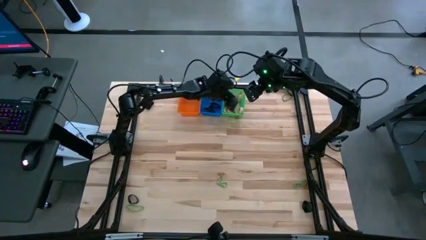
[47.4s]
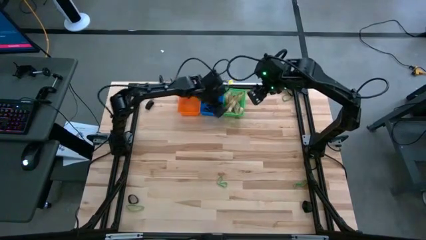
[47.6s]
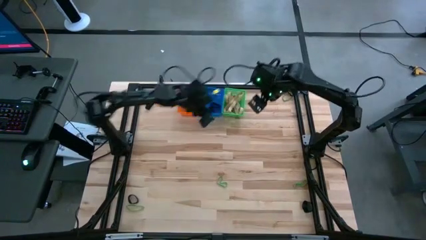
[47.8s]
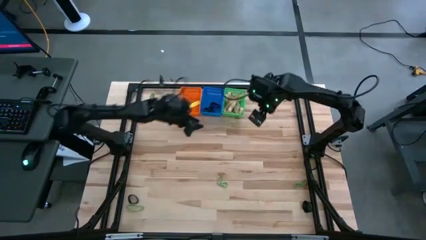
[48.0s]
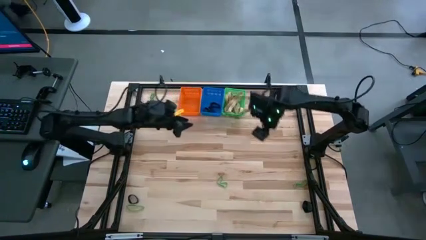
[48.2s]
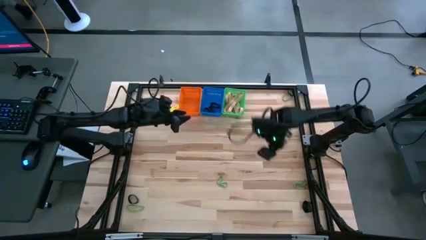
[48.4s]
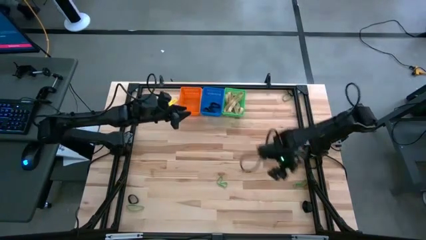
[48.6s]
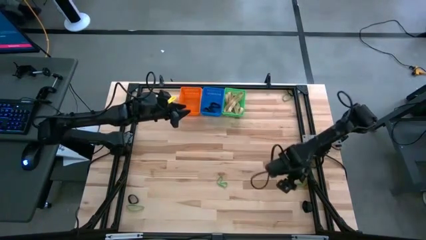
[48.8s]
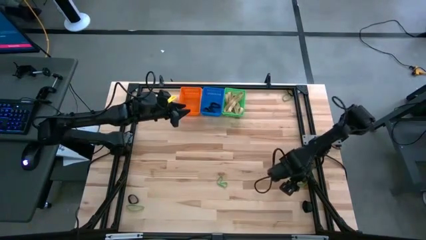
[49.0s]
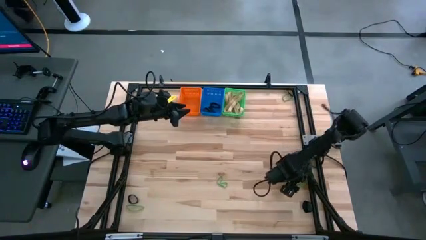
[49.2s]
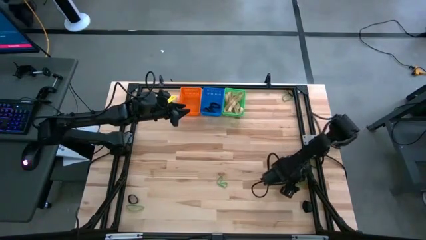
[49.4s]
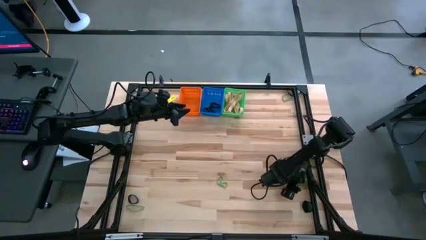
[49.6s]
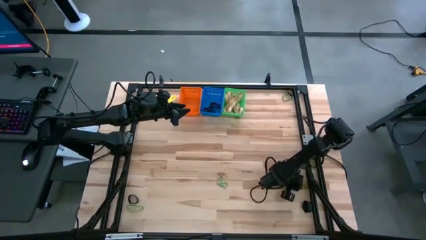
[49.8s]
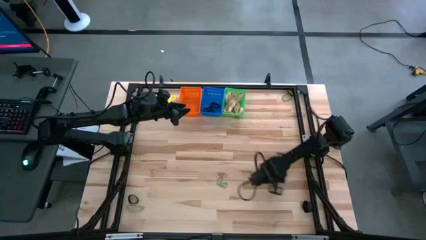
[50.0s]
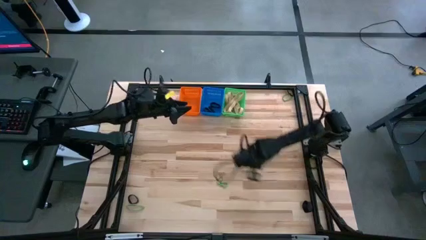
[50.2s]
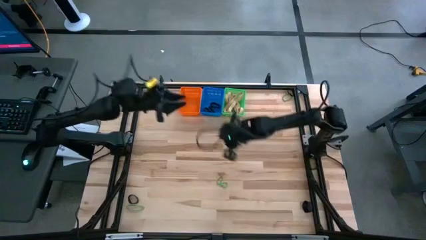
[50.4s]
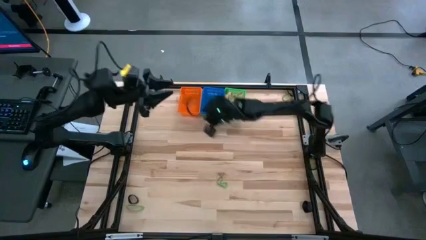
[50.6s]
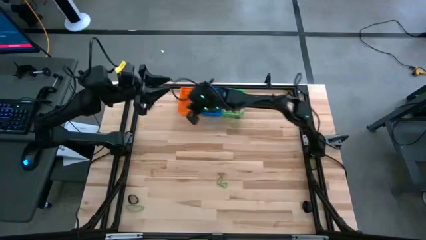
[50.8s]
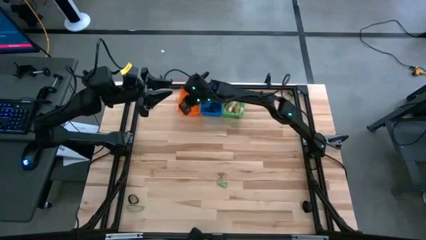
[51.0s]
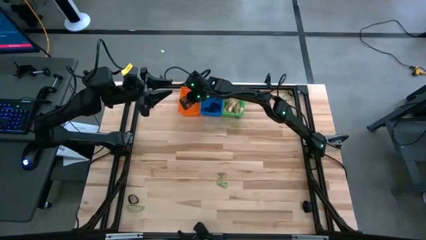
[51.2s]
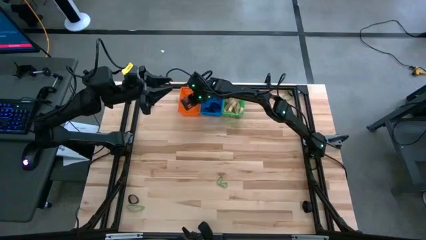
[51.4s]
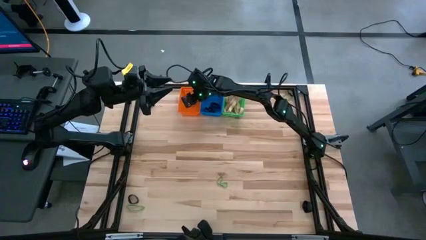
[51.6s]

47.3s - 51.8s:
Task: Sort rubber bands into baskets
Put the green rubber band into the orange bin

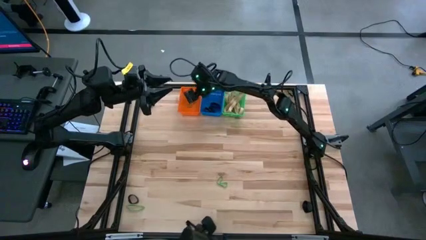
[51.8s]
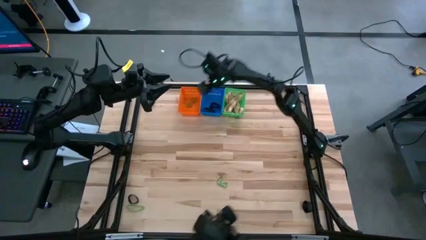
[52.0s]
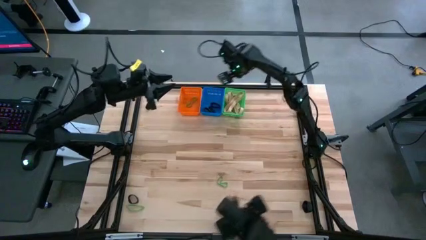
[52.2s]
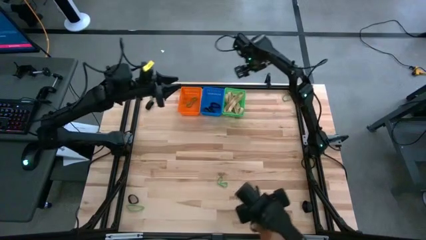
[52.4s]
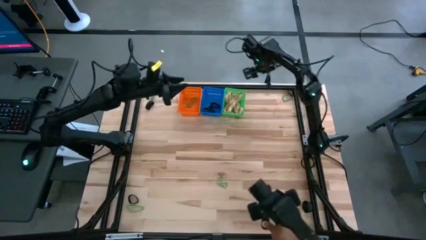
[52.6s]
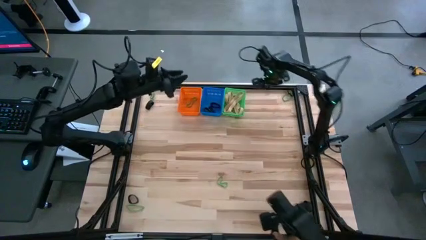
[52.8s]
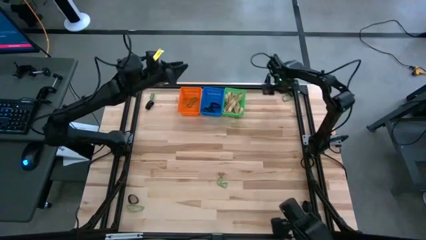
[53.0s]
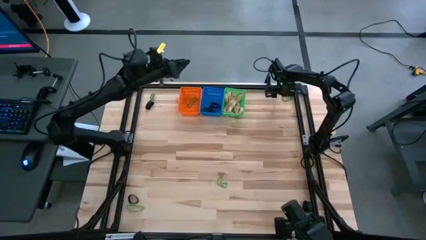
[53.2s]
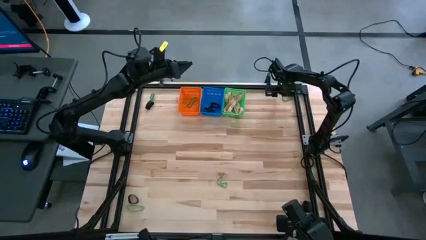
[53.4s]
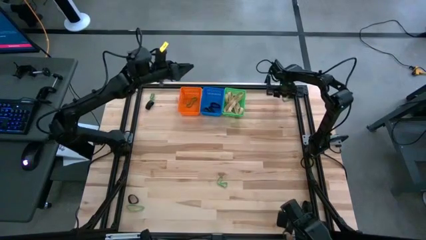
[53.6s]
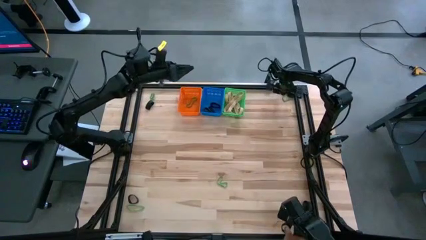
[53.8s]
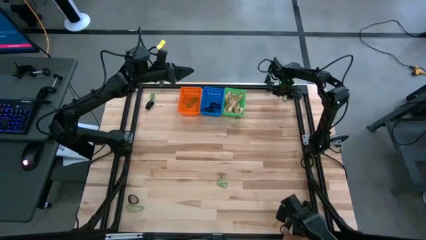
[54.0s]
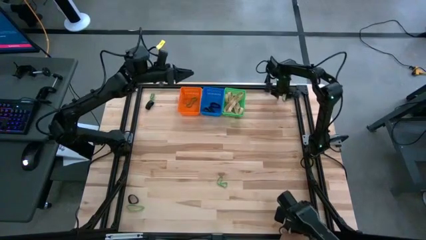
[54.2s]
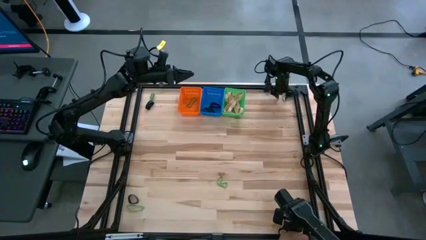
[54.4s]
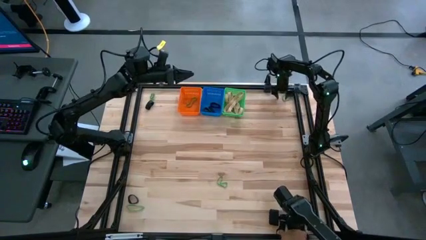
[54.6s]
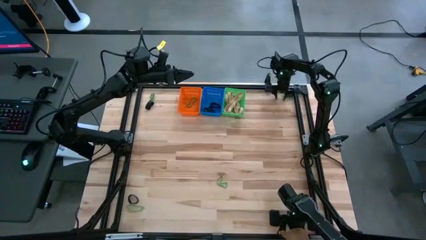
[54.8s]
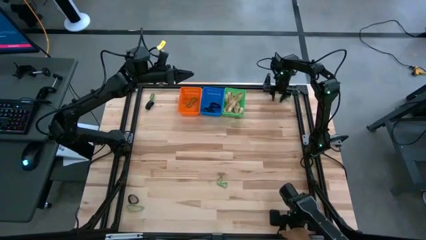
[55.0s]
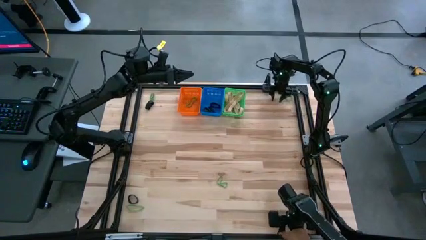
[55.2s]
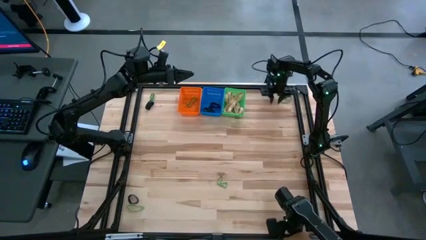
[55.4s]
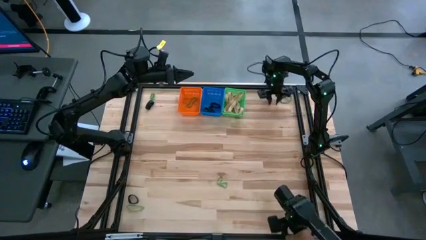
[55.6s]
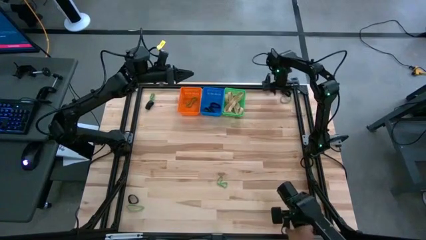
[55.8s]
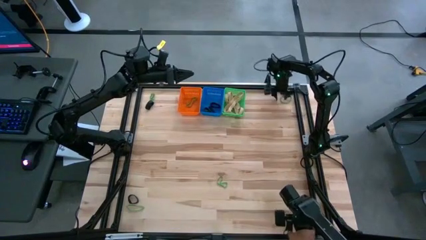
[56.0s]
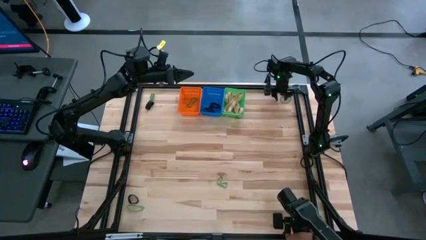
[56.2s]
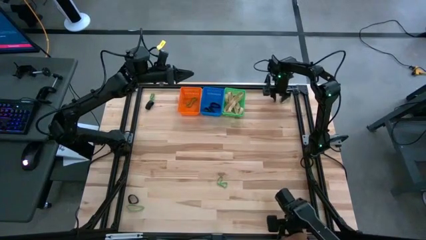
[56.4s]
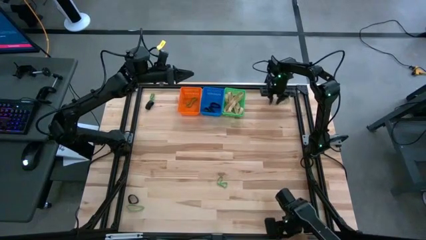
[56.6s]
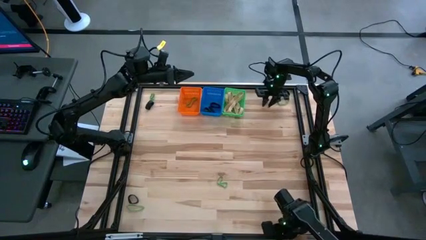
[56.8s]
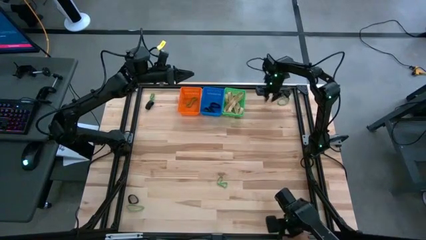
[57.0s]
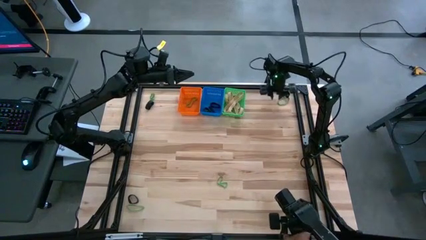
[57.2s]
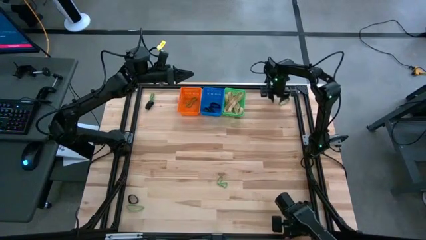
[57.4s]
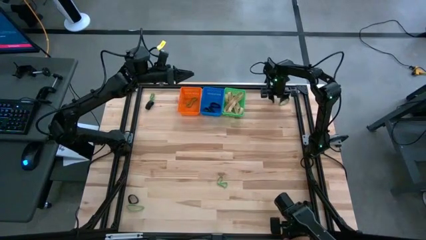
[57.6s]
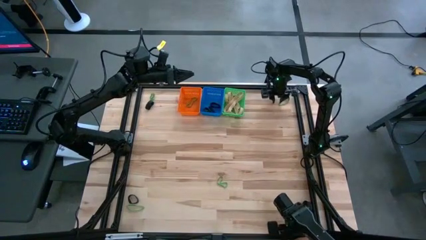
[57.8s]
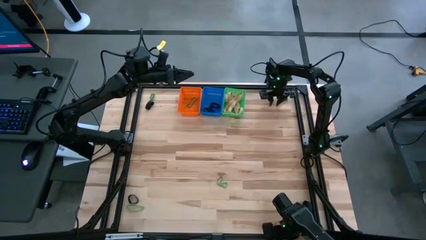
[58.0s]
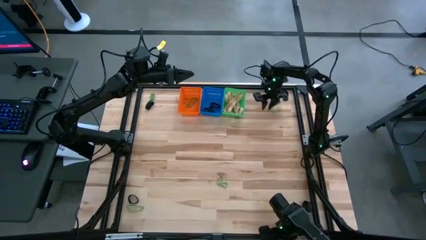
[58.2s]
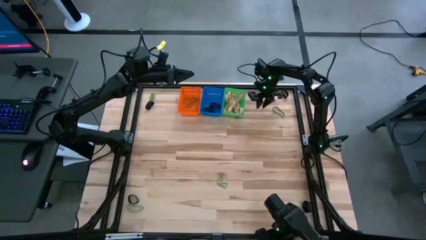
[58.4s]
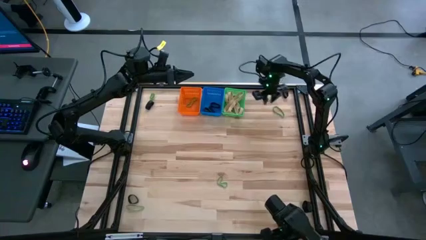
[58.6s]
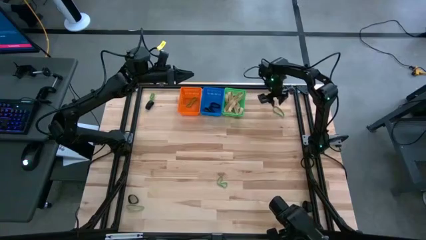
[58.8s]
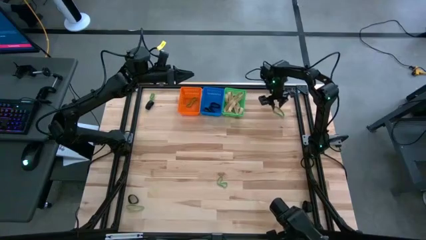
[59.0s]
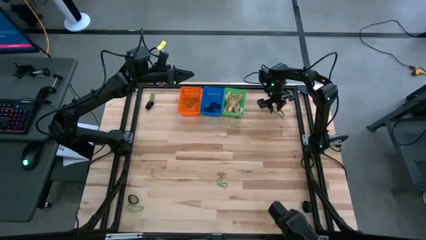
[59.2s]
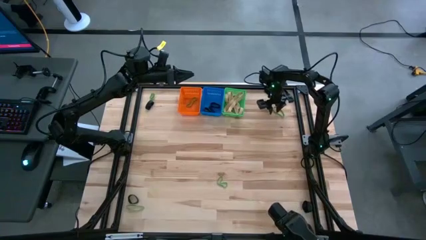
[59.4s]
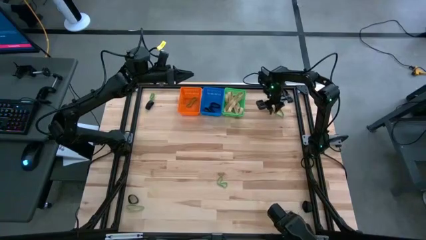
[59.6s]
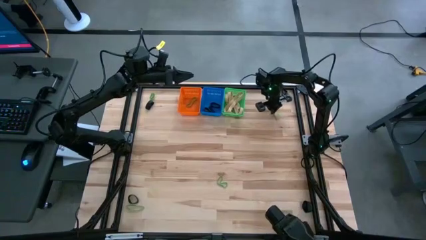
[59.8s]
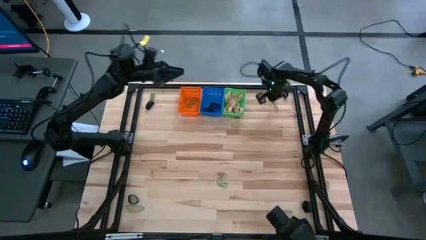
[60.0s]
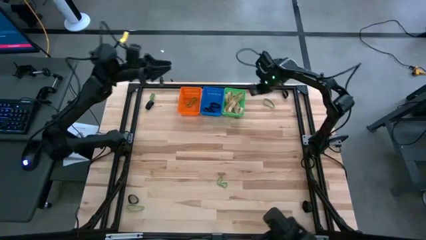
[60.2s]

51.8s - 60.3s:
Put the green rubber band into the orange bin

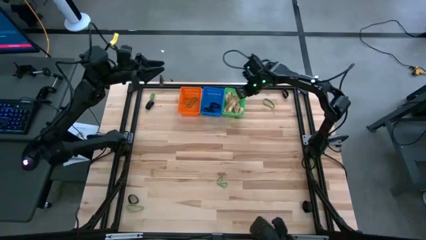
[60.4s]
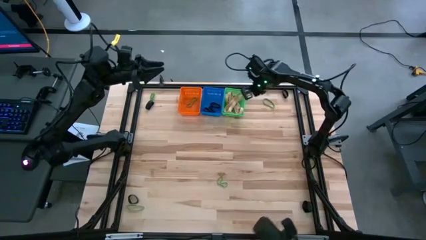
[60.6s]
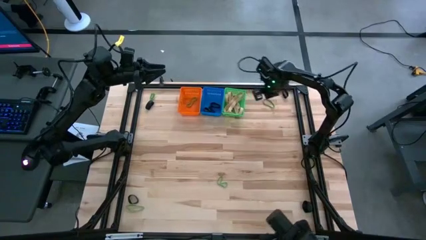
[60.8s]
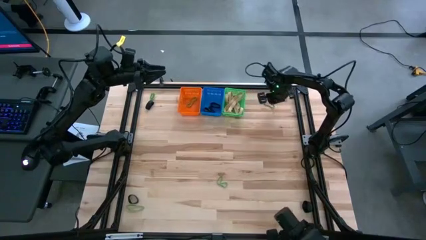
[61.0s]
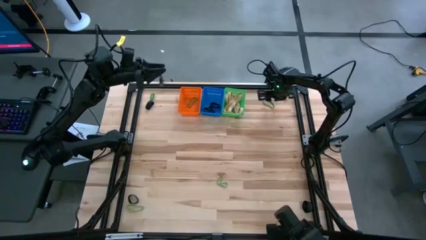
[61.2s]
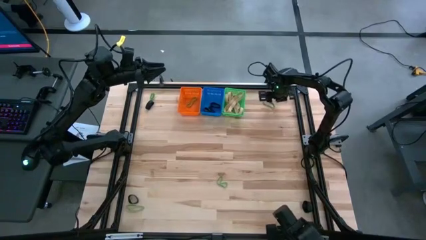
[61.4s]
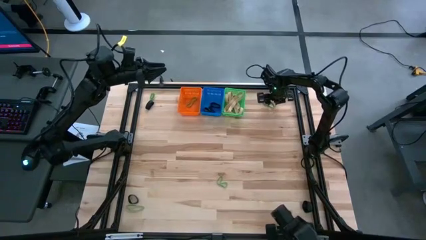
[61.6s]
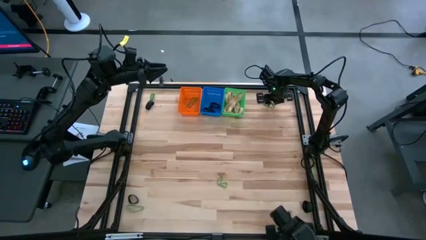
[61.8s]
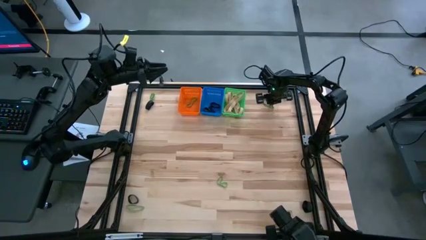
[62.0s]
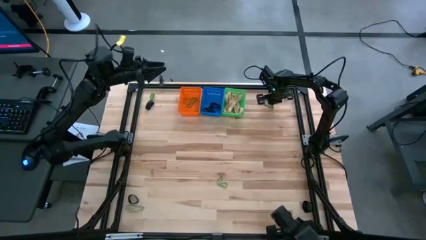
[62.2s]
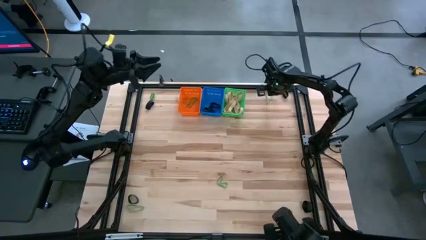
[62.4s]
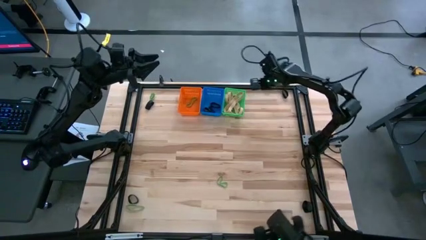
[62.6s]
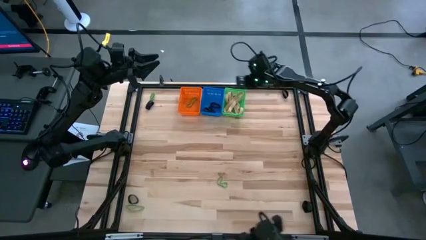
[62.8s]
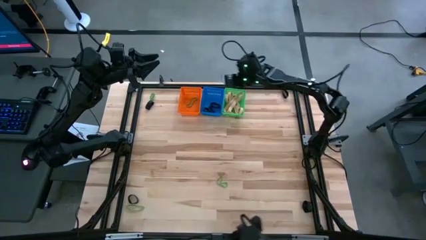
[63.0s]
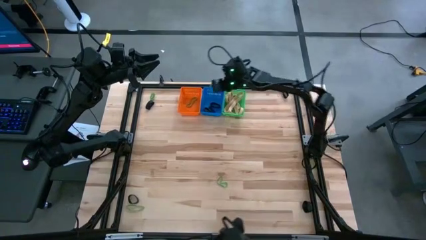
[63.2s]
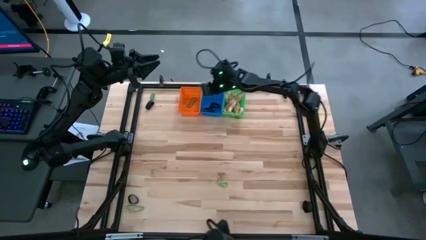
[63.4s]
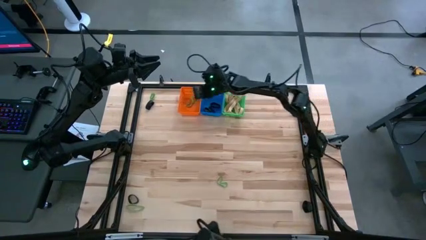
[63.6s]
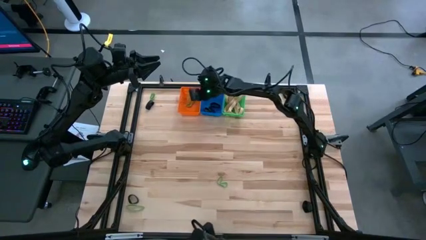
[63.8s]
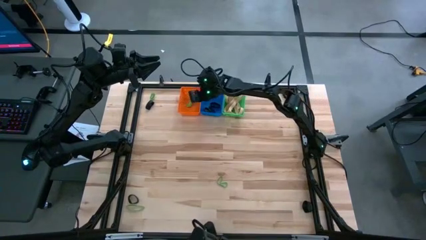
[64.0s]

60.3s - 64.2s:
Put the green rubber band into the orange bin
